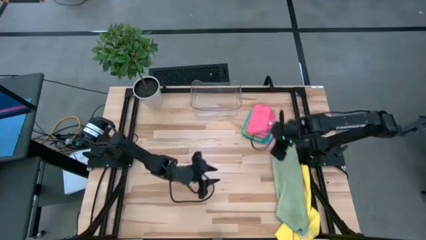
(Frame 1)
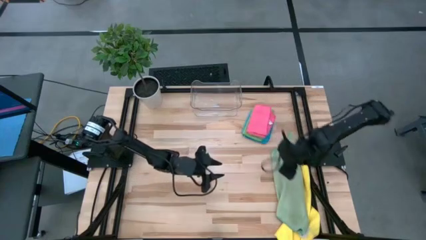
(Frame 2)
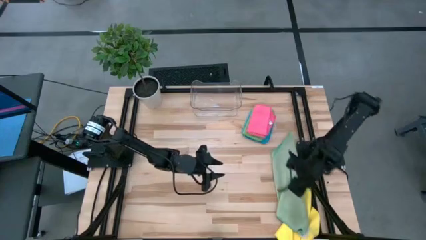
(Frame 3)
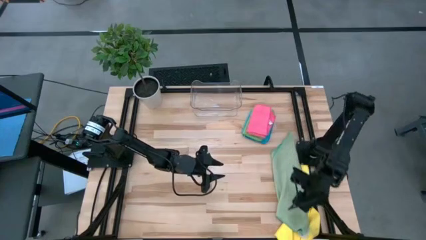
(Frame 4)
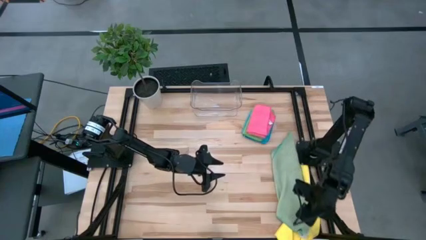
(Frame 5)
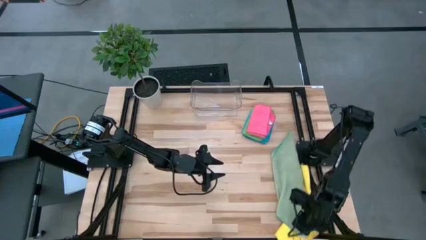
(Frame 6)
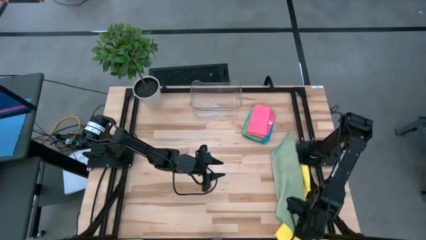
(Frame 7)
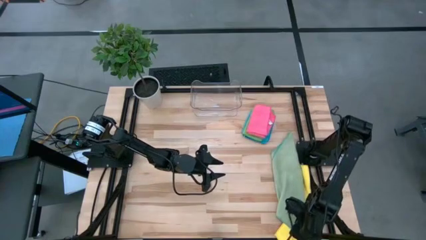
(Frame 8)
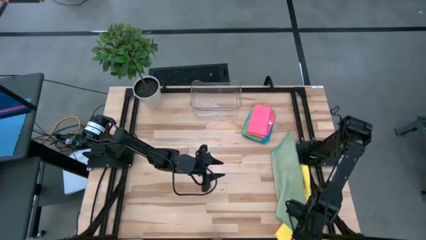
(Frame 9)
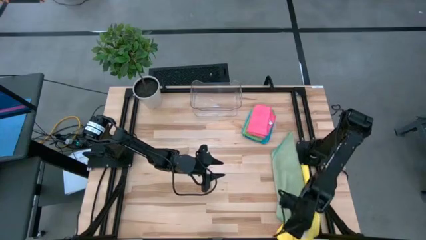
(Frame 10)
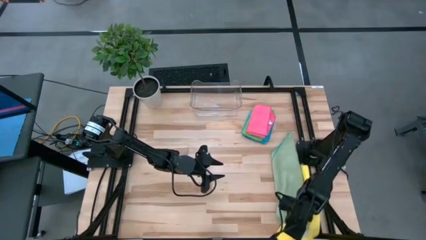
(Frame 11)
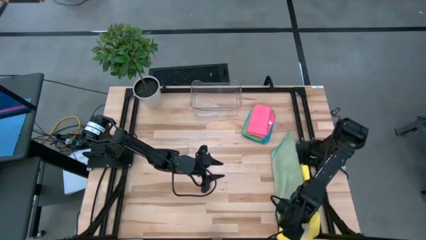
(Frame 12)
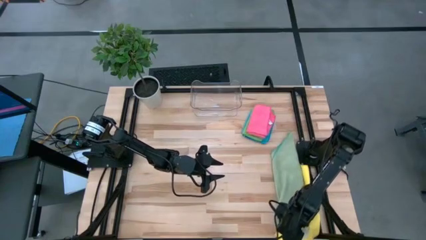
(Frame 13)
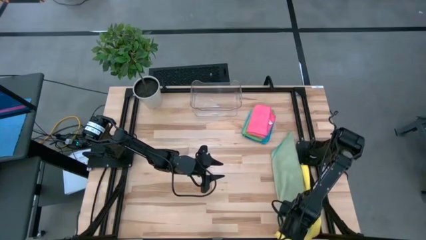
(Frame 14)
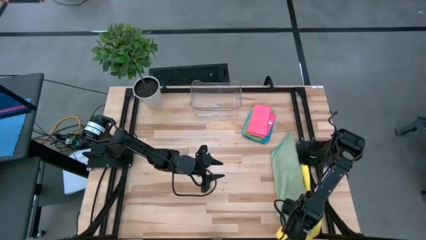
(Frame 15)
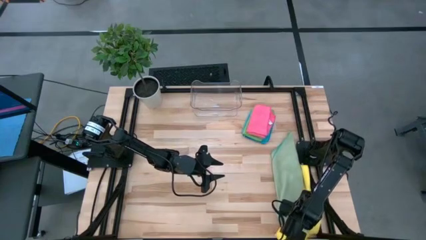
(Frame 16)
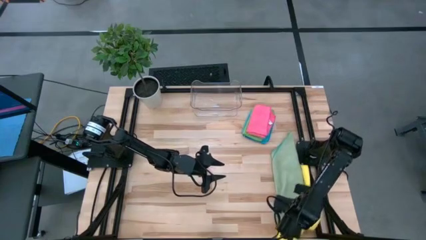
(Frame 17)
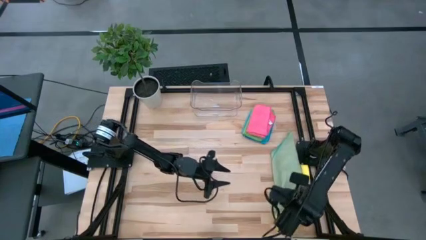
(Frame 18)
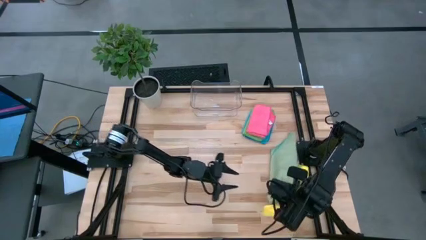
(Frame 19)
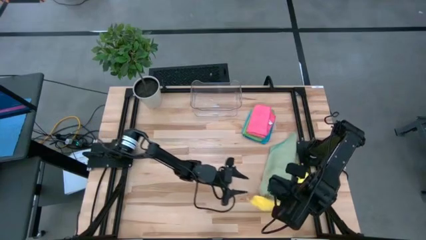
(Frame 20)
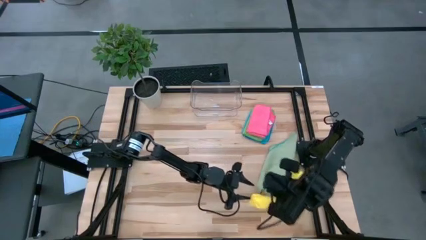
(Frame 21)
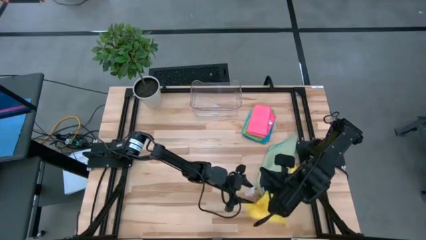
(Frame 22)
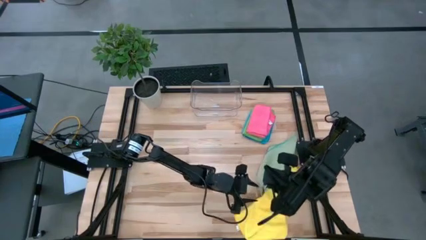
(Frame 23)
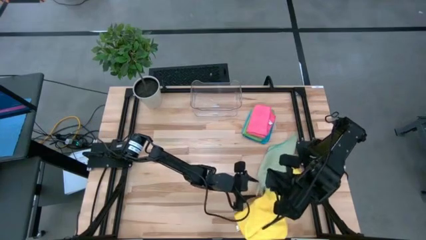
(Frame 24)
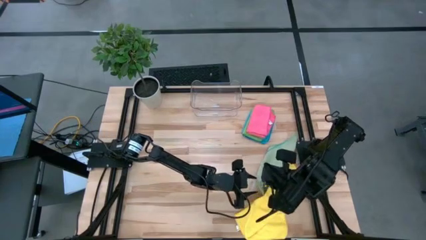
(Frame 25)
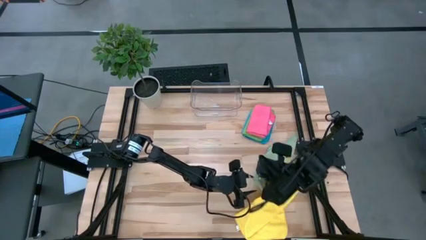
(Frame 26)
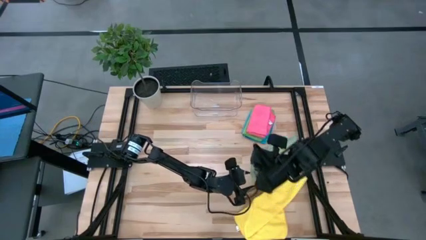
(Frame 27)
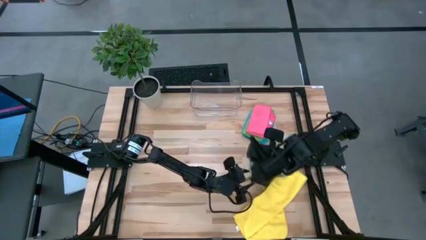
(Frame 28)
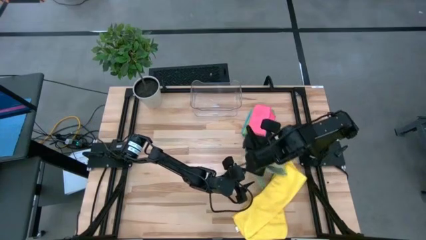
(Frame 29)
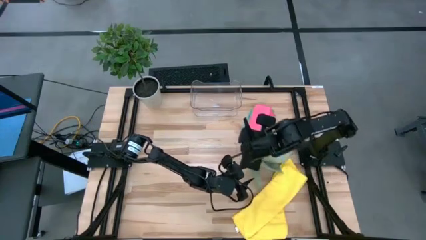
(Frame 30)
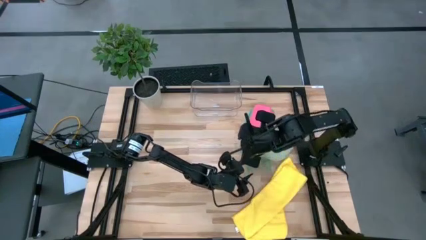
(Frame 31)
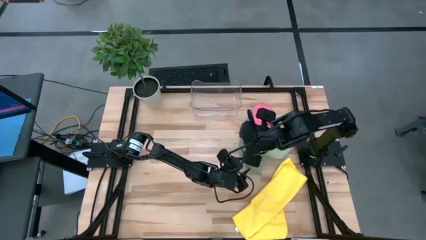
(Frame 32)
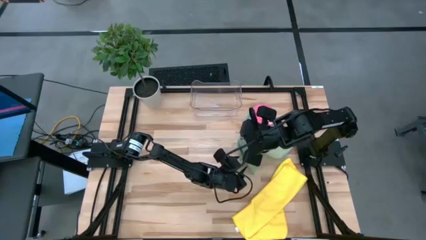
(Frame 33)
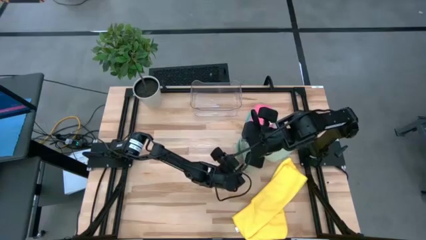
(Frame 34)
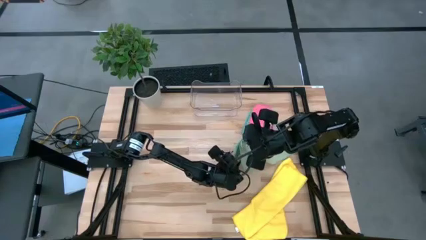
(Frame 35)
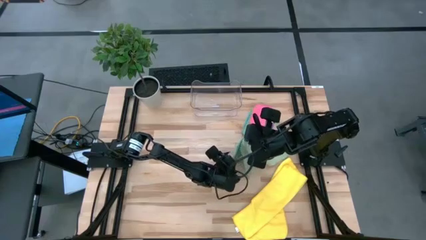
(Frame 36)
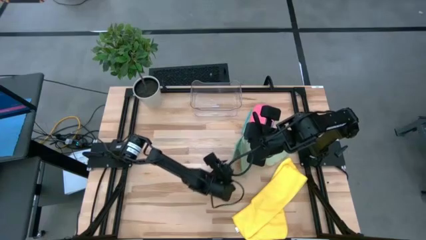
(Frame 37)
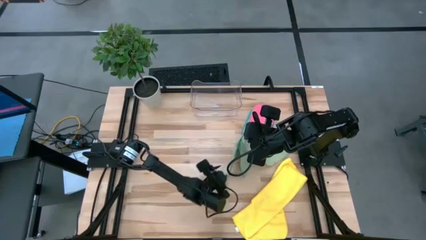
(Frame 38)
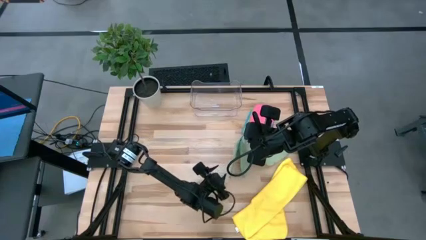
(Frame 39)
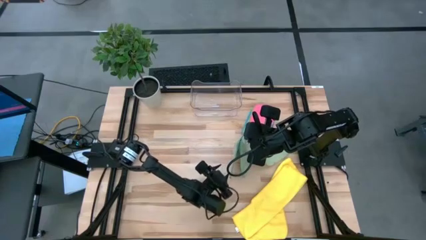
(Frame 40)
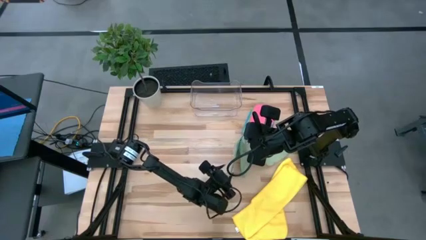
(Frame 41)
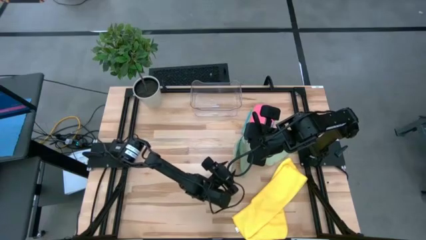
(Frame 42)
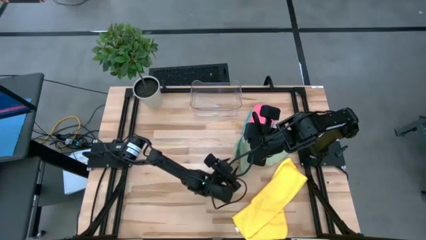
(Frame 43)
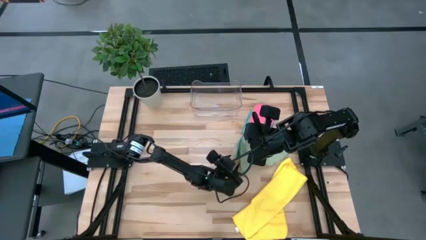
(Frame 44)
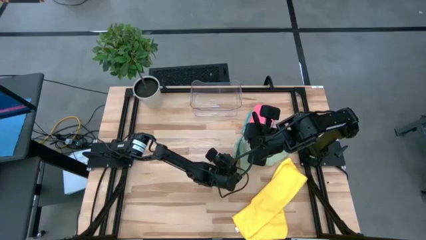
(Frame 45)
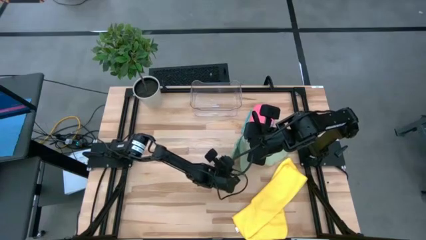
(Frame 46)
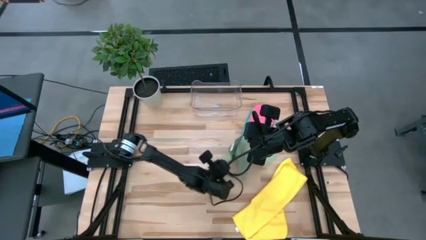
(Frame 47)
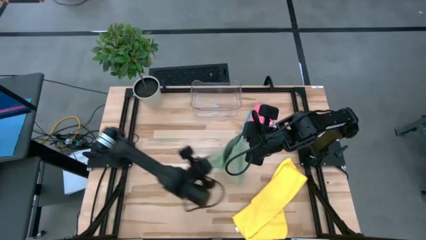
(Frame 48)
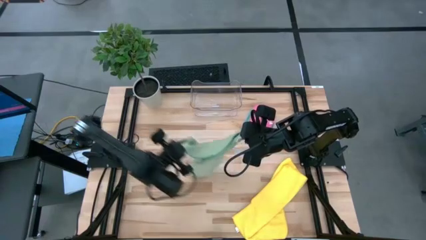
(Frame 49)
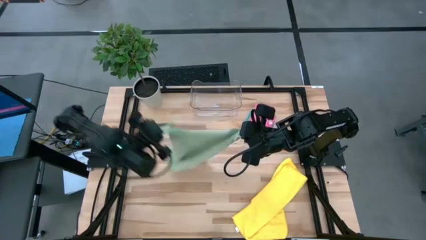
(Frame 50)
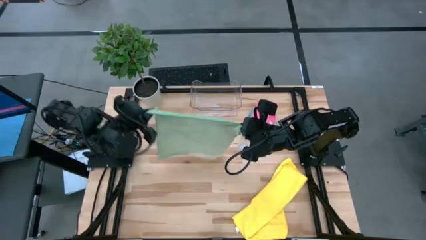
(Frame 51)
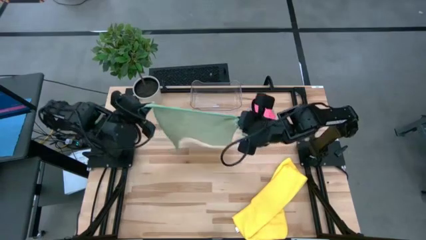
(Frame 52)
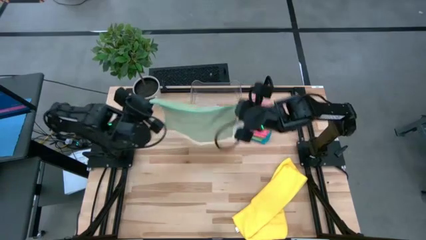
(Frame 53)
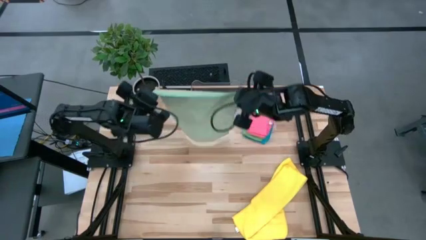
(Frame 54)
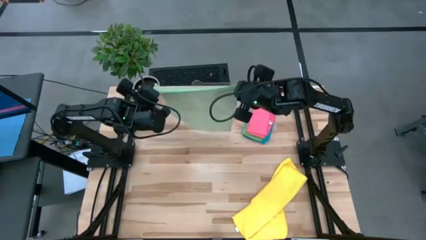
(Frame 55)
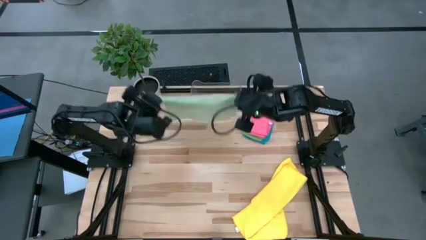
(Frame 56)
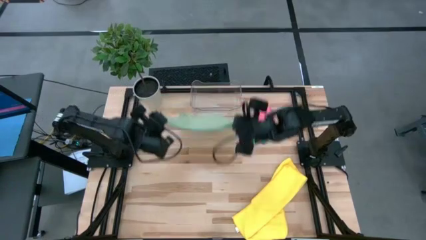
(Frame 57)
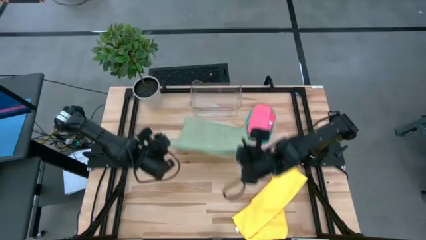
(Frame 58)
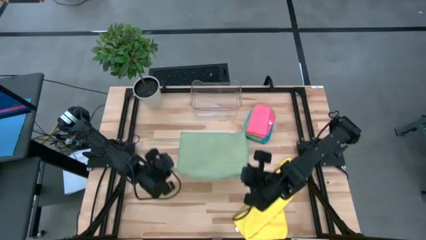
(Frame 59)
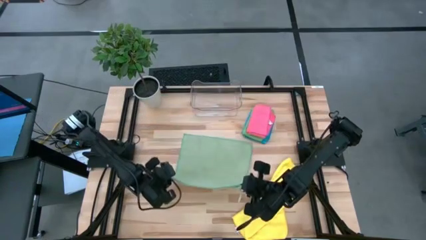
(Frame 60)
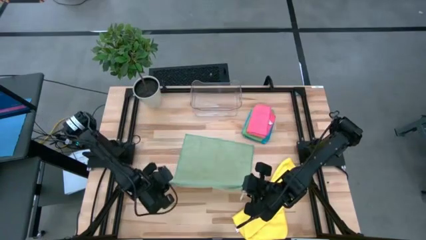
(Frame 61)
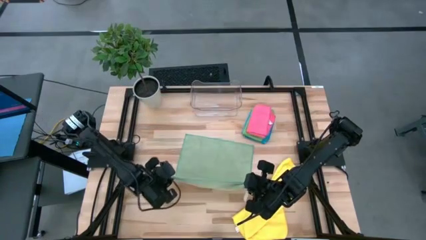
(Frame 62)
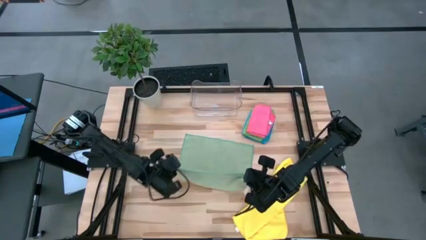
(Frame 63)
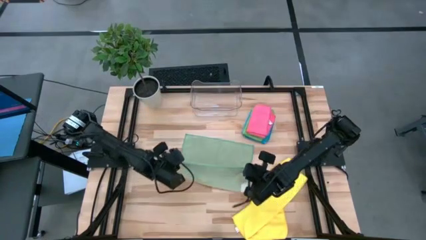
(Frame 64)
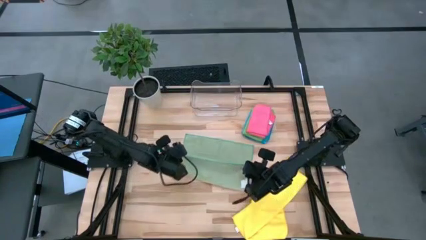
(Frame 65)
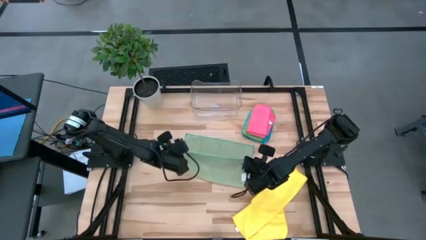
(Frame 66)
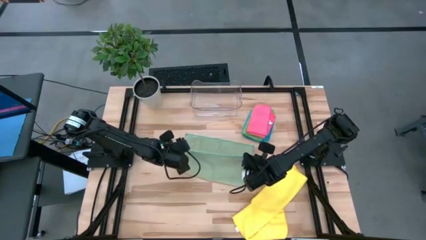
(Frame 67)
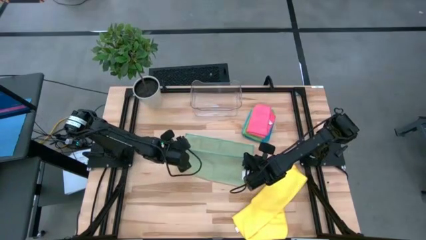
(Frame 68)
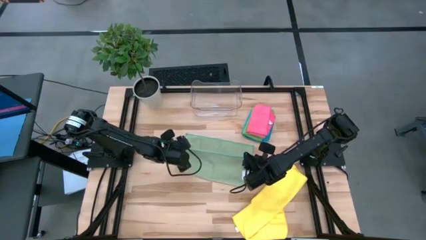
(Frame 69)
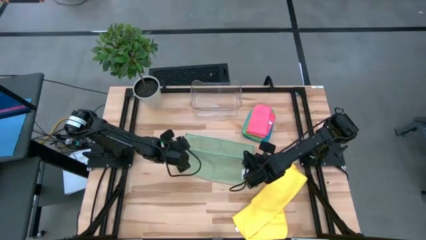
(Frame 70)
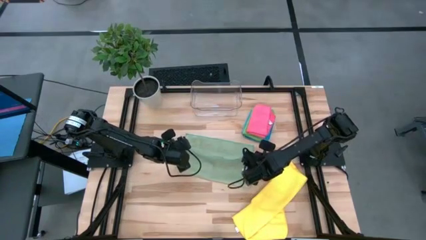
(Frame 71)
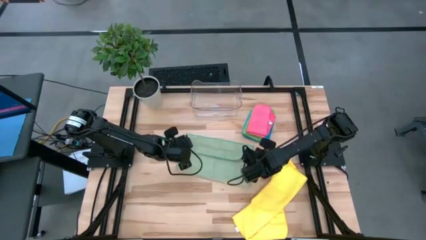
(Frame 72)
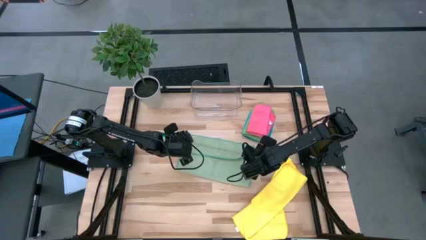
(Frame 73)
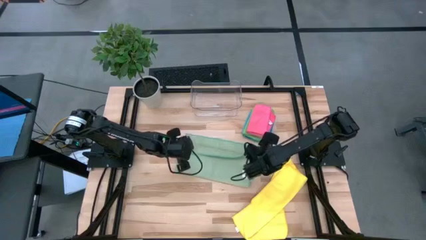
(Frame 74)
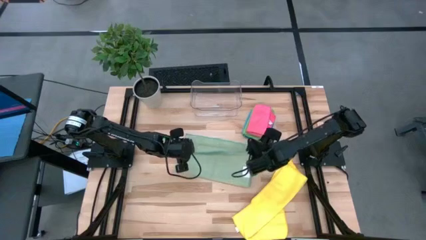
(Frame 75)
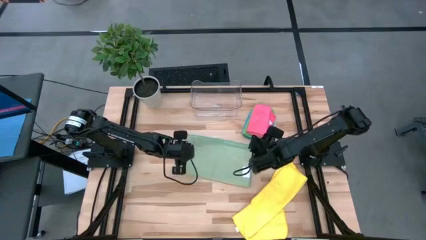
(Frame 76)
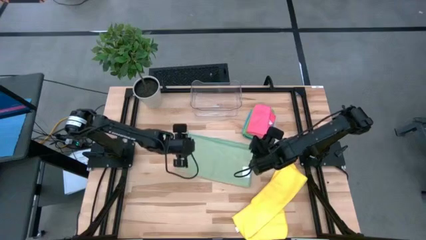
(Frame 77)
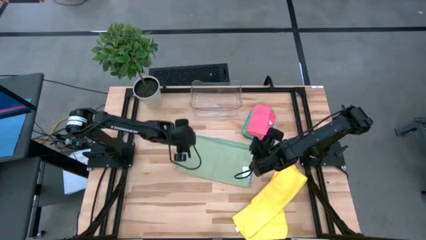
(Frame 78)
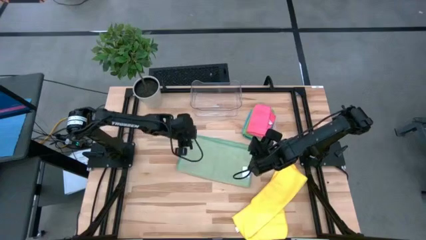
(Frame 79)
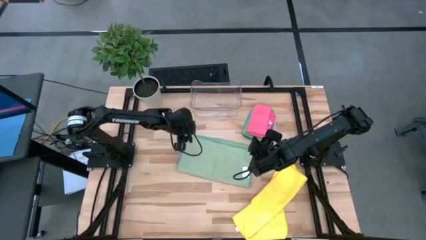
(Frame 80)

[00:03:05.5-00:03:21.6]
Task: Fold microfiber towels
Fold the light green microfiber towel
